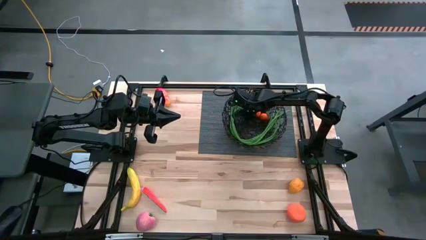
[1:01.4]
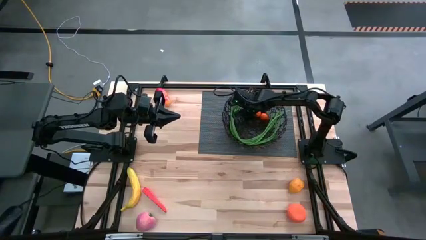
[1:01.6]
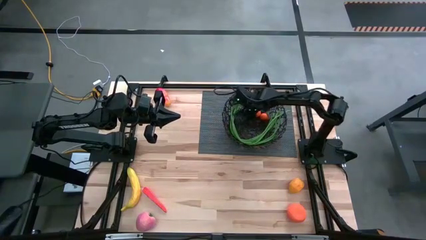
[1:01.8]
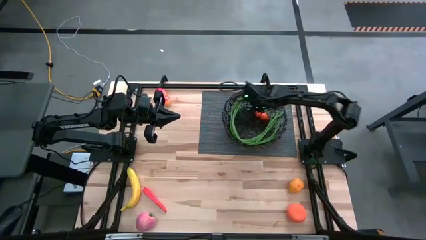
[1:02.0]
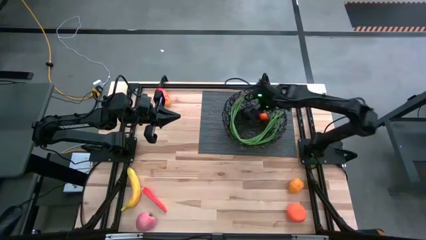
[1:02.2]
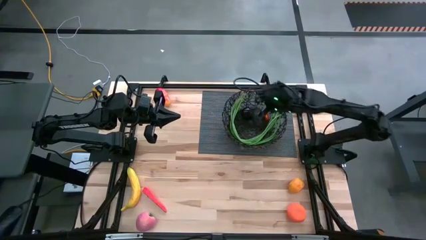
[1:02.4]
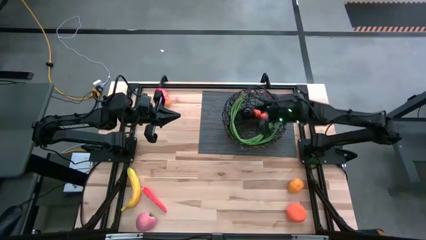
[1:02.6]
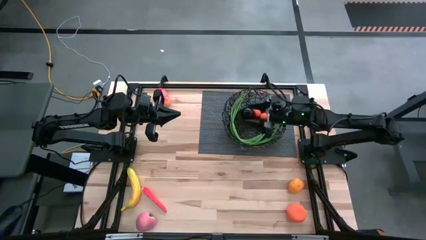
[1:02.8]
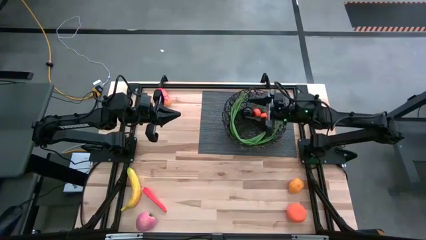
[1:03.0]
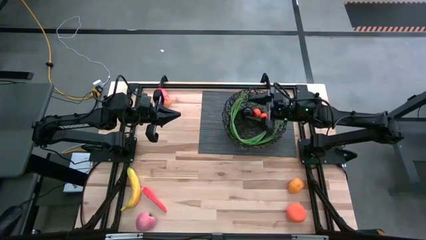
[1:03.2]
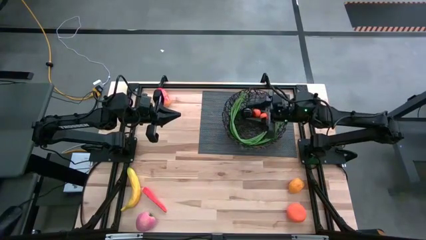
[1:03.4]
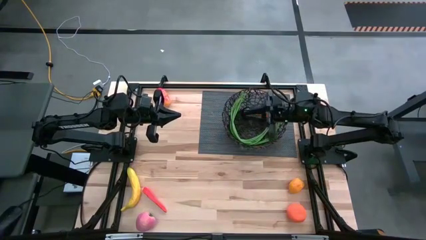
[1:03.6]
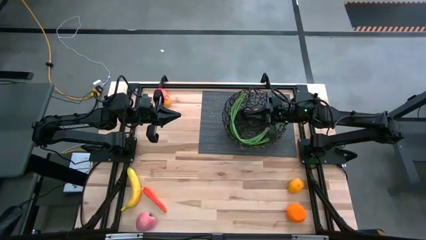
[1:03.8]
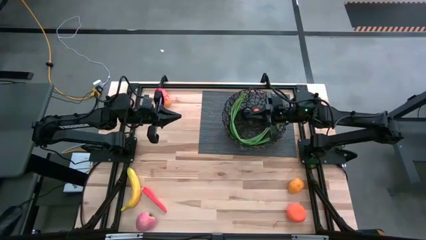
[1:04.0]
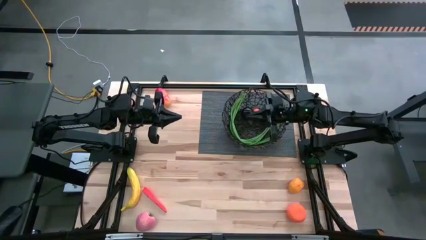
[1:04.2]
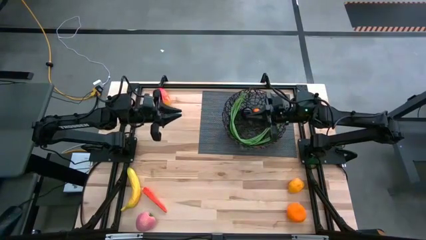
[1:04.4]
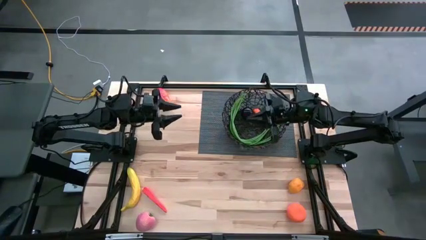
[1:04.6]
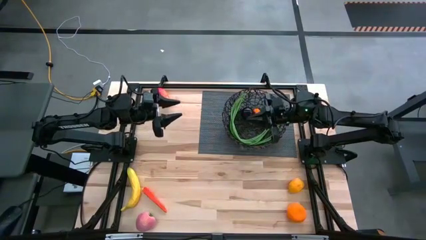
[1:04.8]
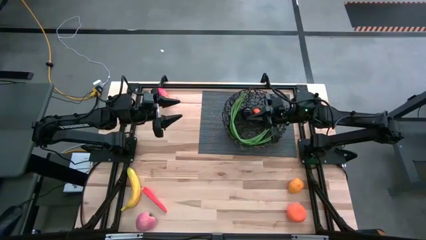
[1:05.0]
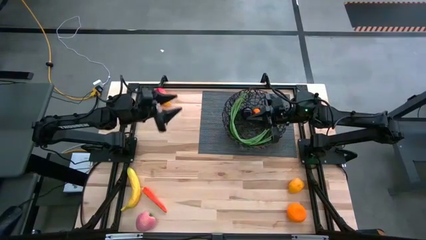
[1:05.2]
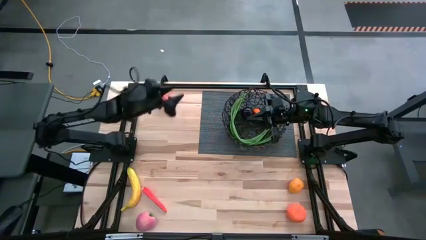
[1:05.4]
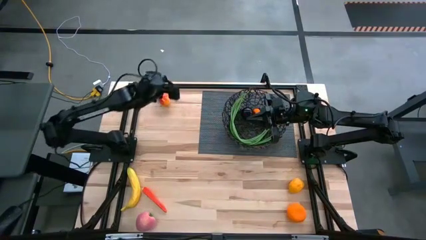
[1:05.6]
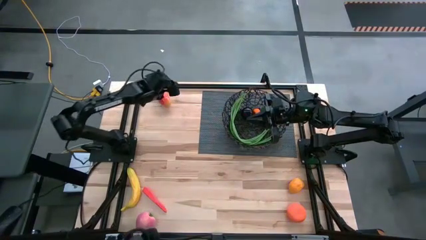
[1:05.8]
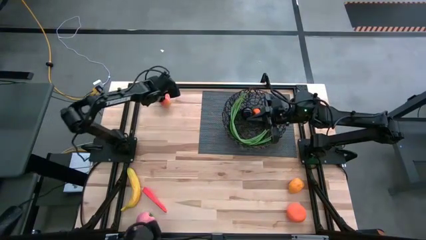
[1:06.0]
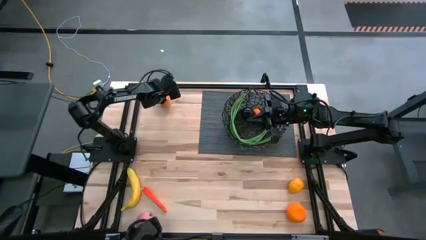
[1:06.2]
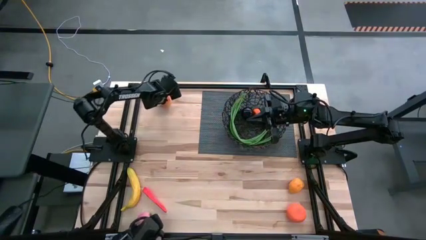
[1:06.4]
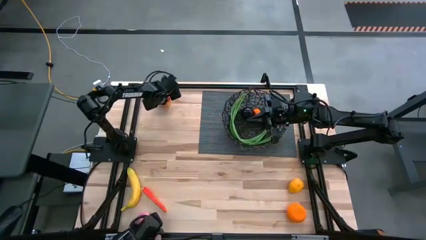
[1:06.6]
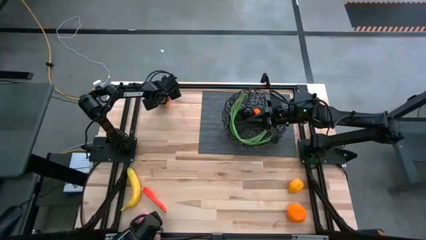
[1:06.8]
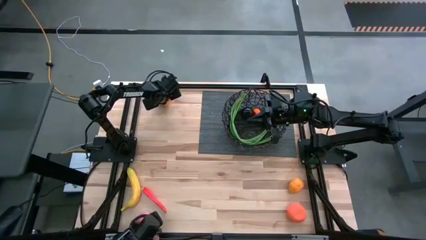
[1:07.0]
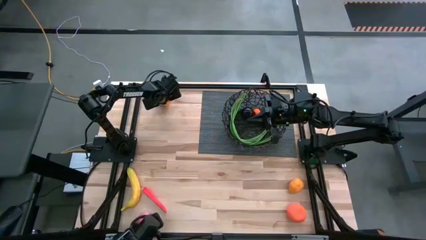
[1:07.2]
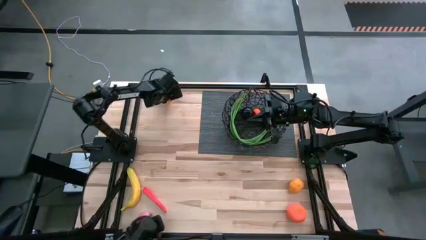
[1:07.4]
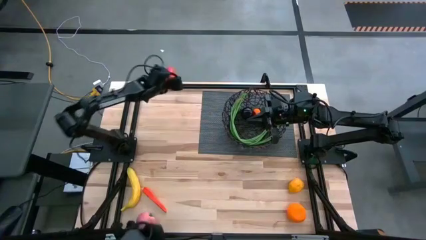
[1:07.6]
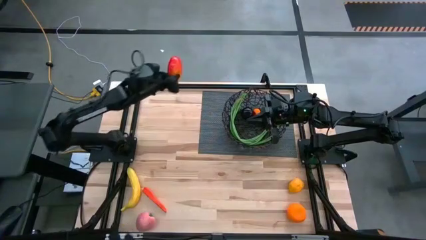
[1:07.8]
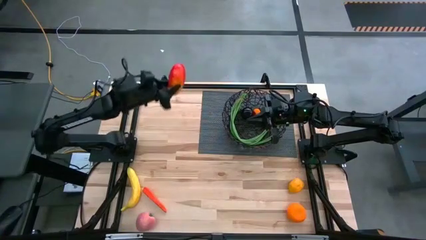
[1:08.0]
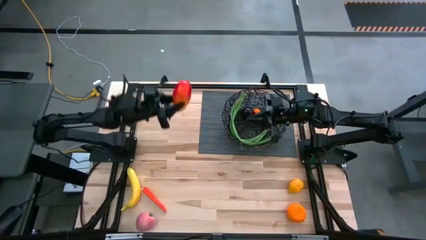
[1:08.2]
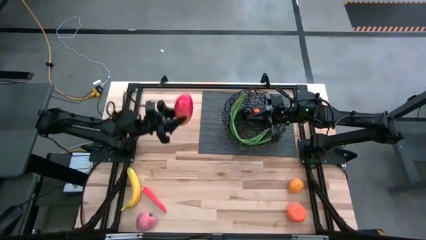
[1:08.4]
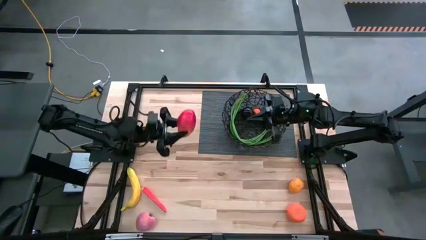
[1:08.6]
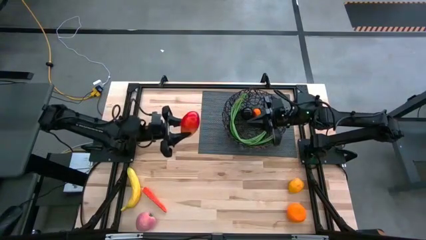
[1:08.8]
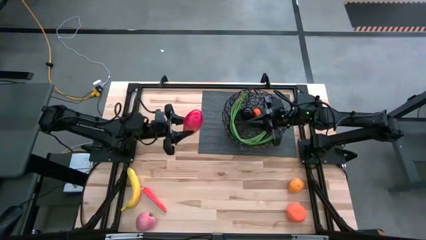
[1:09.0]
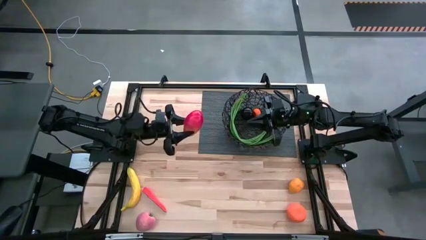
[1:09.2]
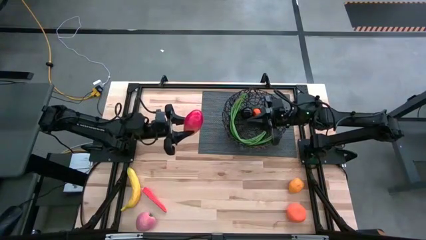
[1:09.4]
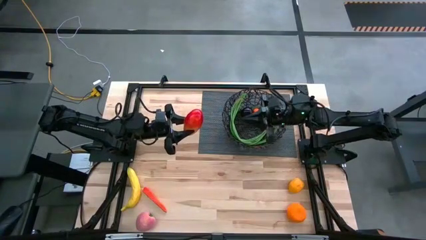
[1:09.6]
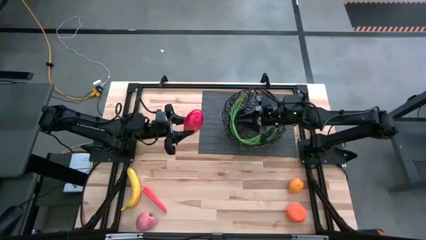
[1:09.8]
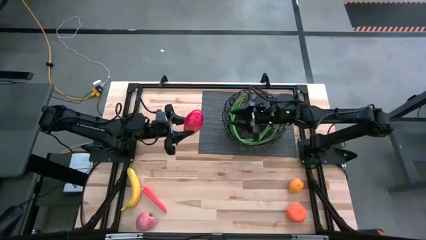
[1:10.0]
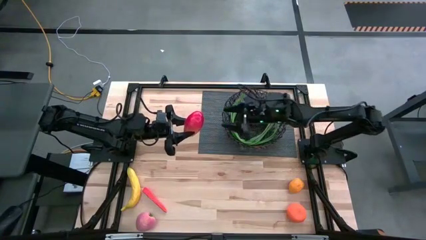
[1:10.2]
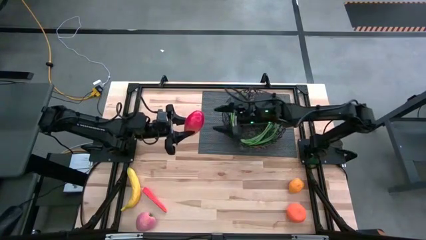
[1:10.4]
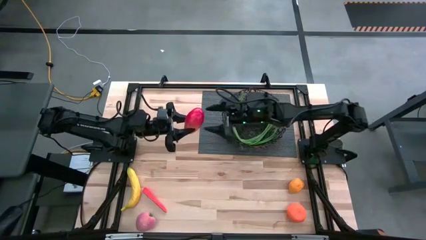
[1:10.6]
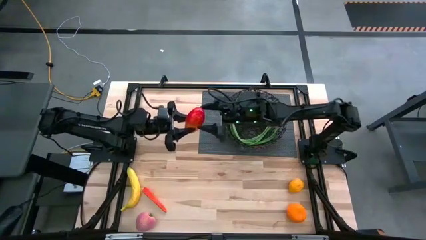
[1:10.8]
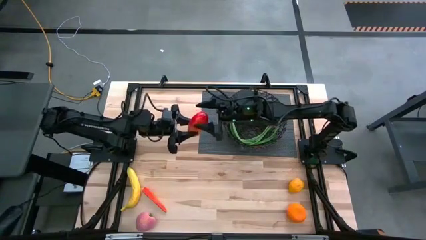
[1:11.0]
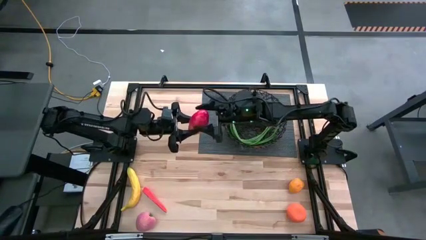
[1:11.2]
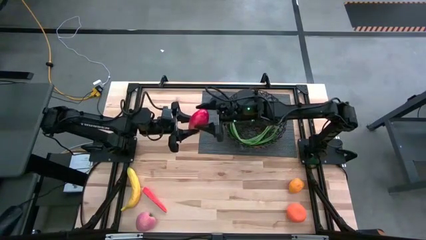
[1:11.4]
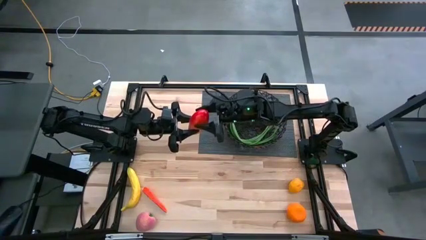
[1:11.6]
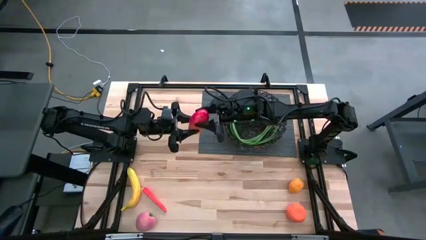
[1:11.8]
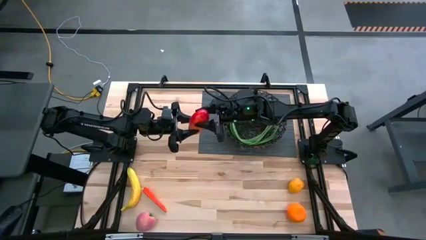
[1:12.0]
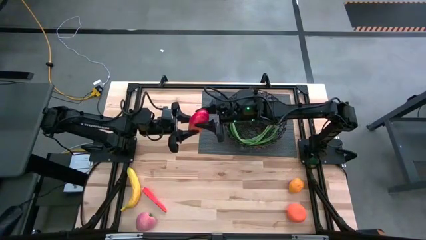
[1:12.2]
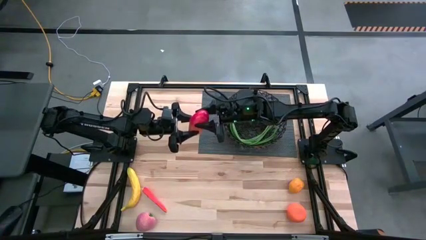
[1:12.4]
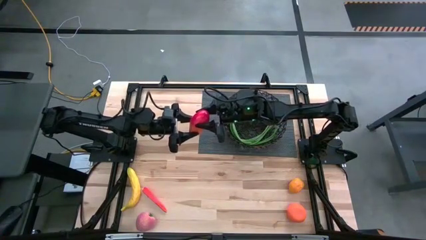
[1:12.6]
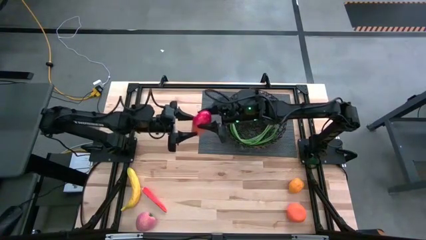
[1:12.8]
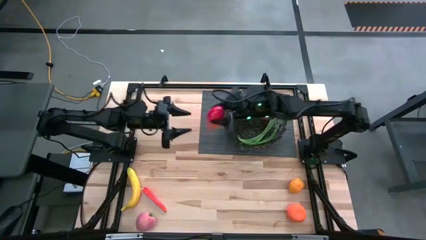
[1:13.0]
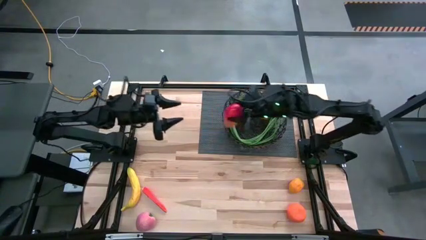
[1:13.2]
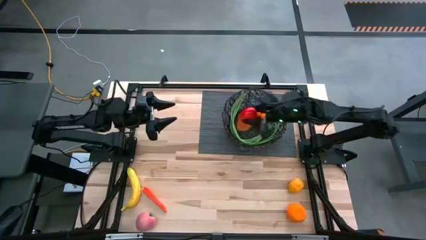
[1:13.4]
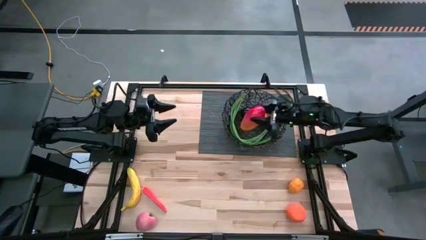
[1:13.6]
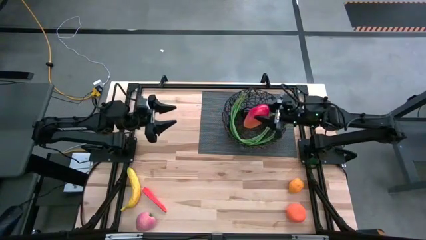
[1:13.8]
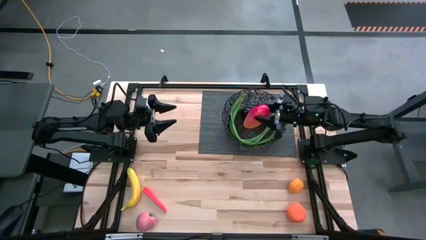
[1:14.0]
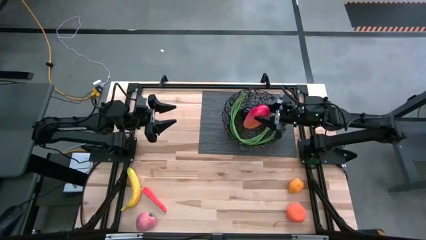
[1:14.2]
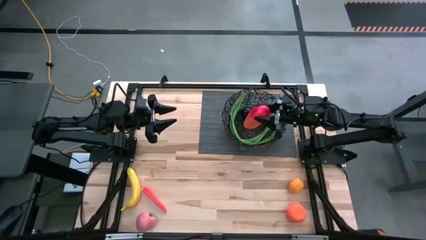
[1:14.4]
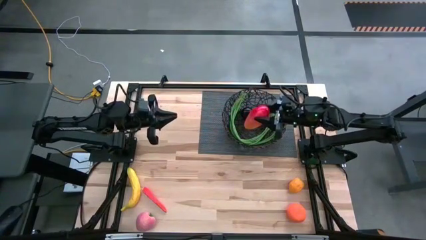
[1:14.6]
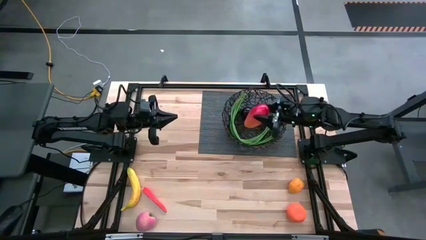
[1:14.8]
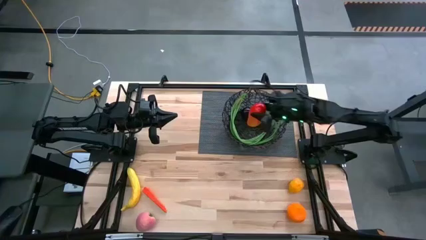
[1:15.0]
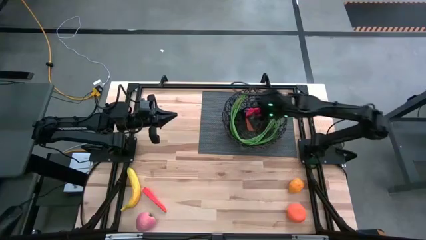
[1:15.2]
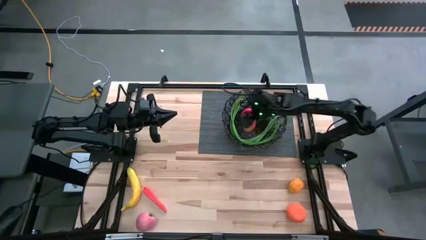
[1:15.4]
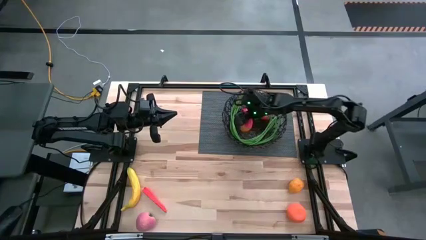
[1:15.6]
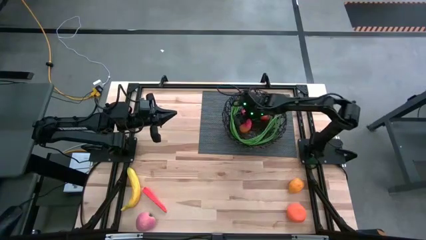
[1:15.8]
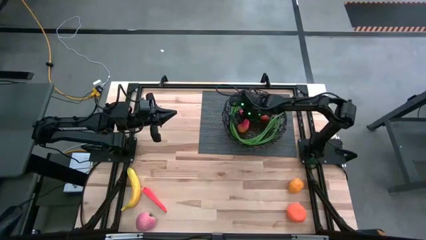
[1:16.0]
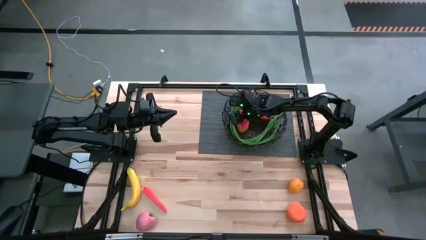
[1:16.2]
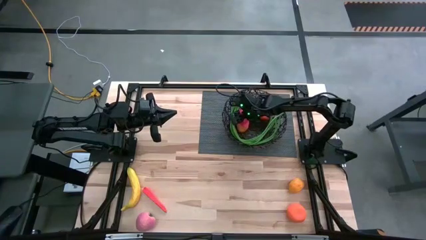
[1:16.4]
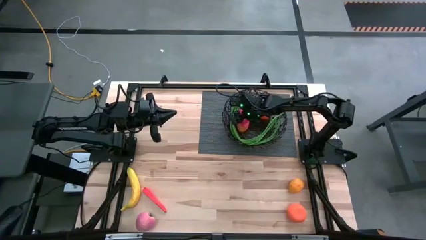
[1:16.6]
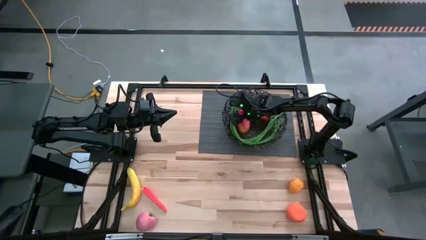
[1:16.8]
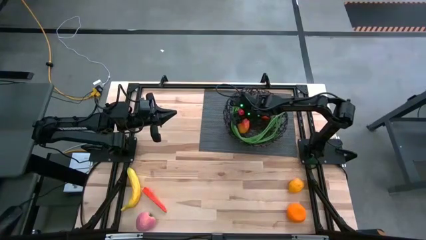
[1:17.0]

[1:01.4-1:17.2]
Task: Build produce basket
Put the mango into the wire basket

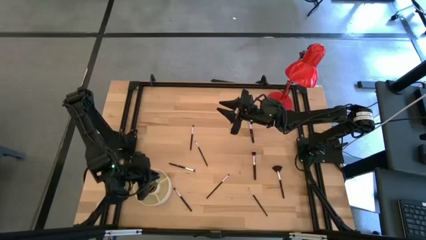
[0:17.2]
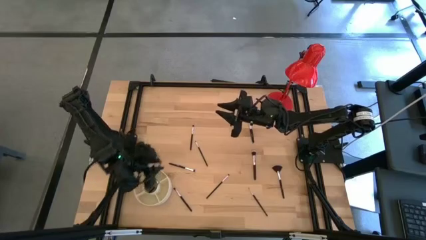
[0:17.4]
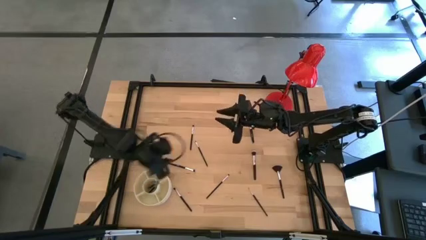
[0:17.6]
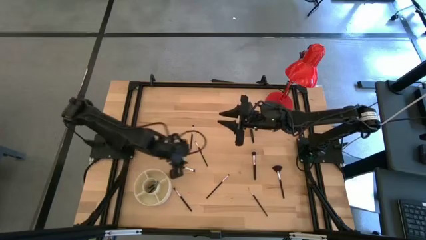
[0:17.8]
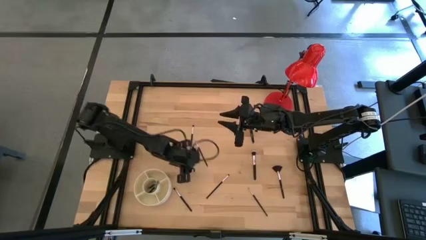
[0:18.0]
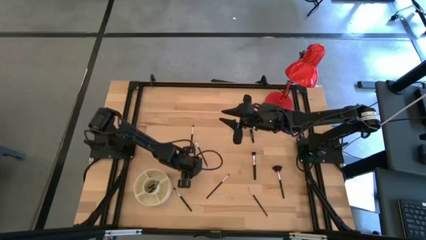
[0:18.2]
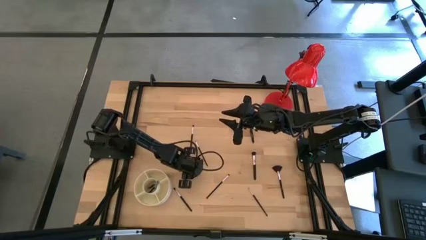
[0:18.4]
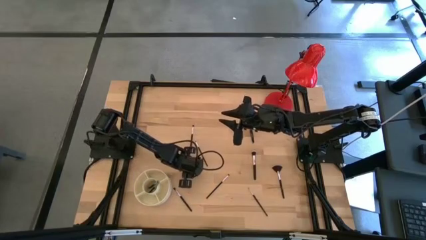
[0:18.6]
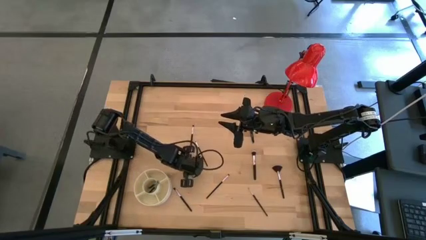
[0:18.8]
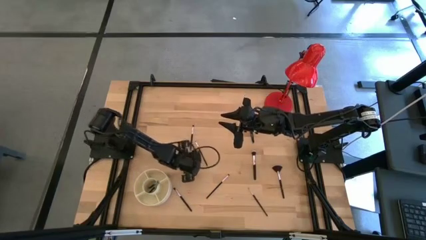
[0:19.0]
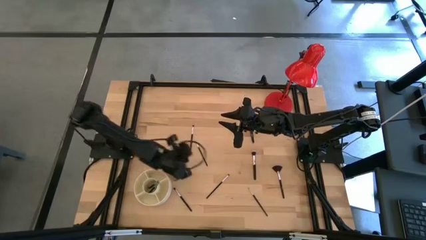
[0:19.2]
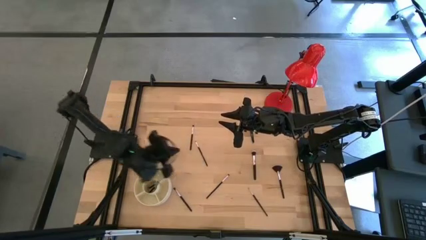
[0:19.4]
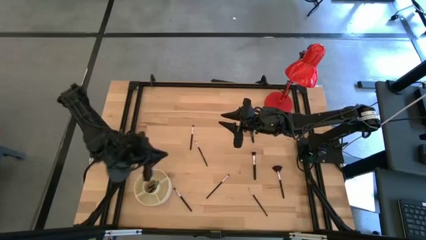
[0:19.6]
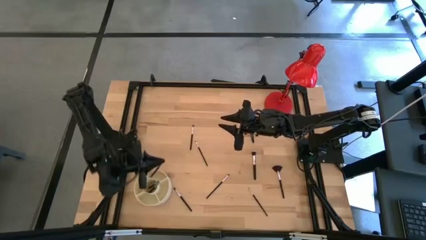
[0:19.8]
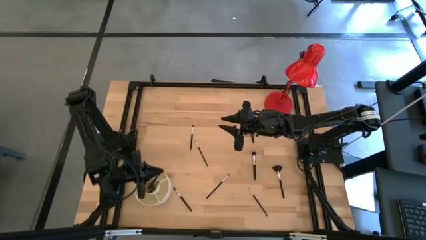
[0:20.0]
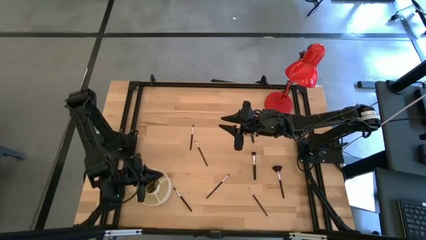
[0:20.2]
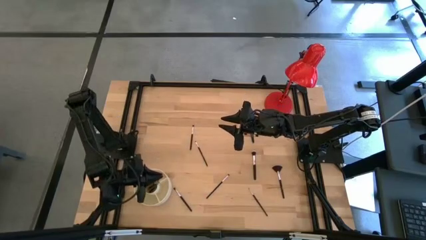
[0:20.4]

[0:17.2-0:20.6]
Task: Put items in baskets/containers
Put the black eyeshadow brush into the white organizer
